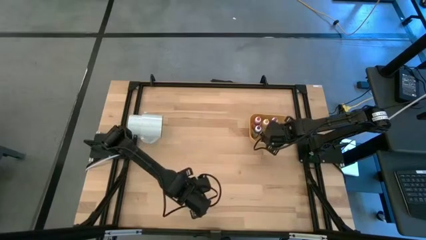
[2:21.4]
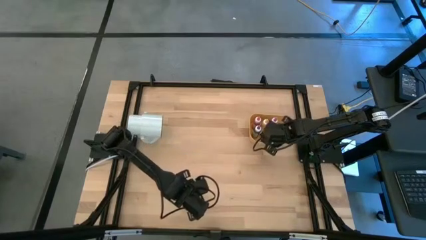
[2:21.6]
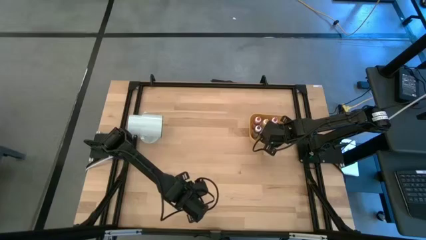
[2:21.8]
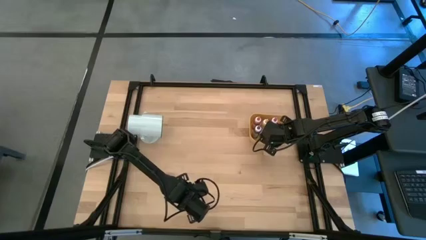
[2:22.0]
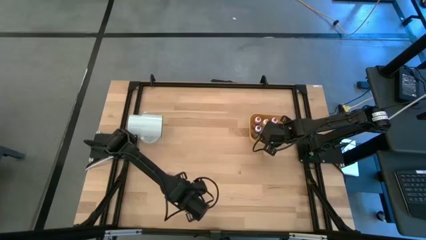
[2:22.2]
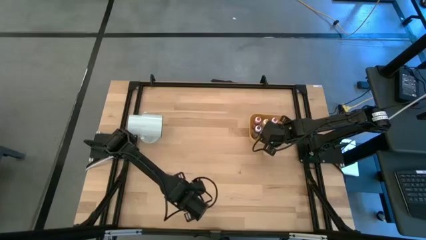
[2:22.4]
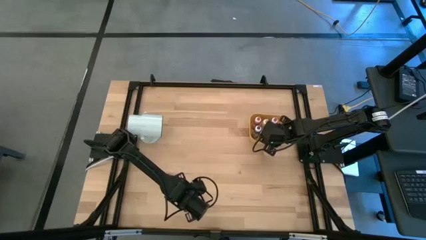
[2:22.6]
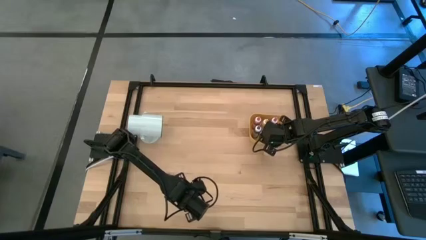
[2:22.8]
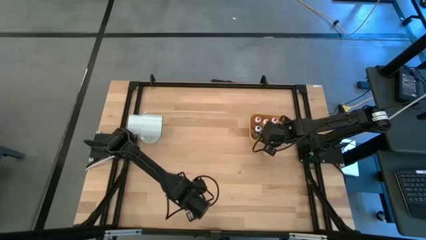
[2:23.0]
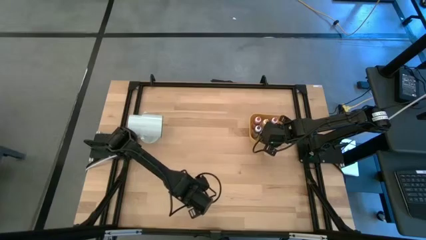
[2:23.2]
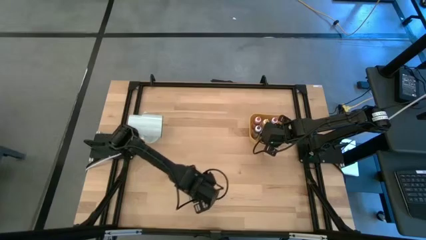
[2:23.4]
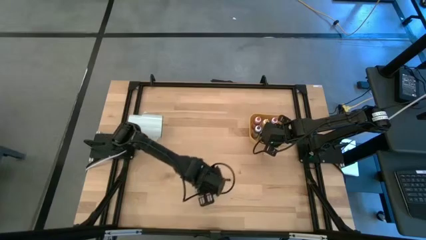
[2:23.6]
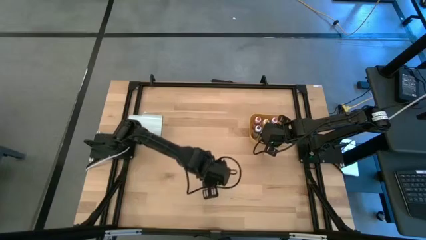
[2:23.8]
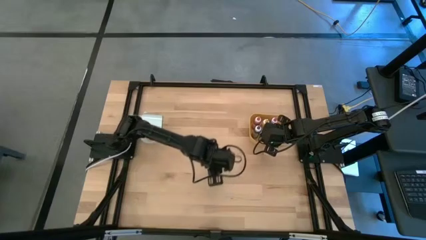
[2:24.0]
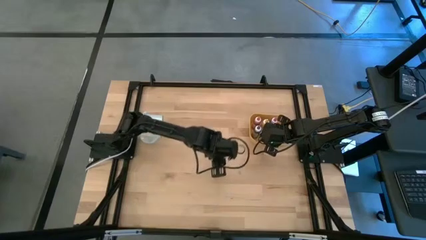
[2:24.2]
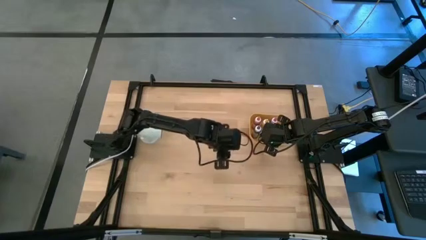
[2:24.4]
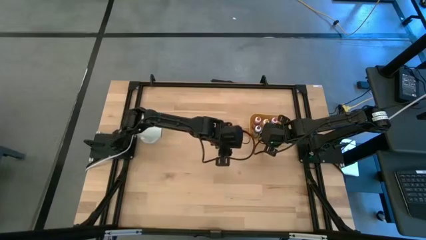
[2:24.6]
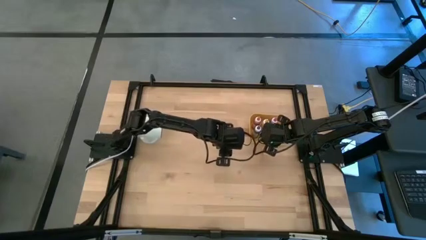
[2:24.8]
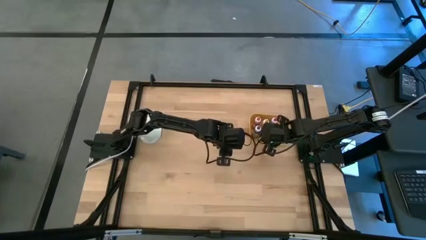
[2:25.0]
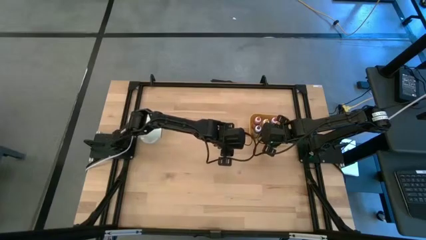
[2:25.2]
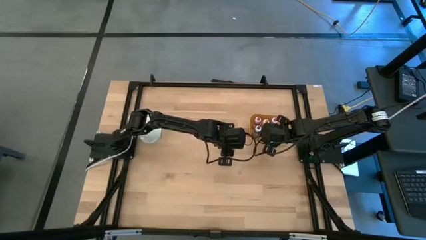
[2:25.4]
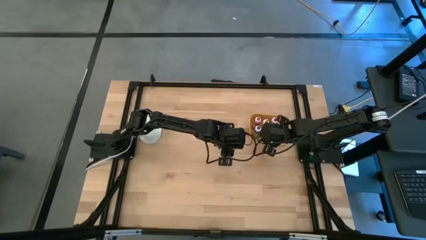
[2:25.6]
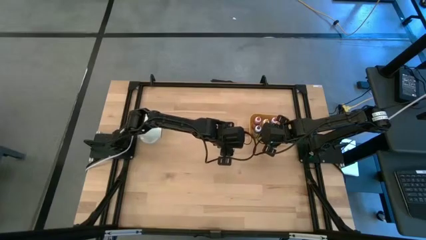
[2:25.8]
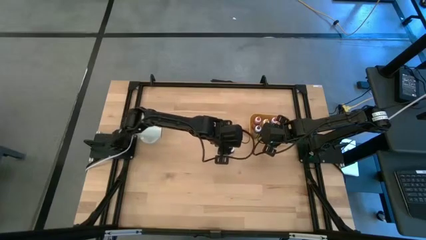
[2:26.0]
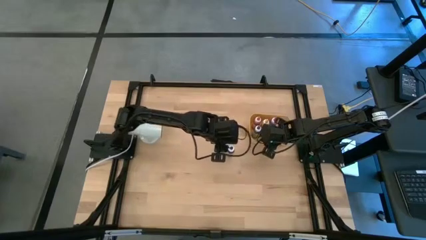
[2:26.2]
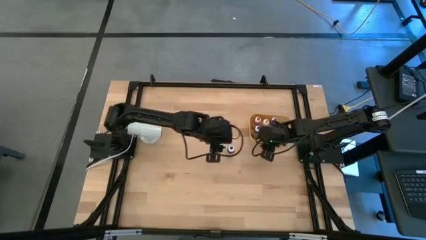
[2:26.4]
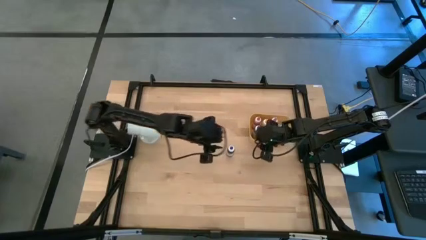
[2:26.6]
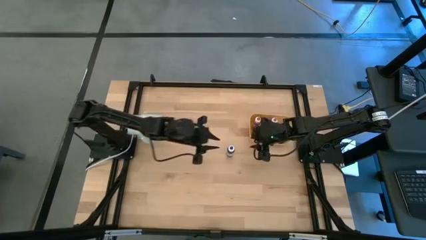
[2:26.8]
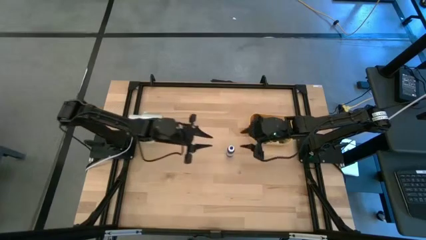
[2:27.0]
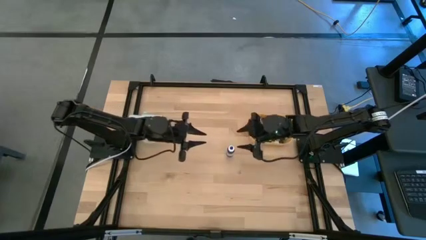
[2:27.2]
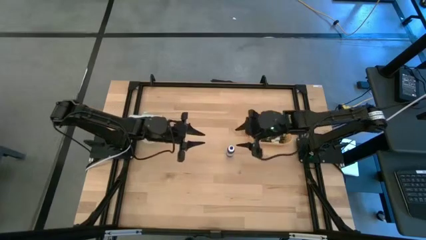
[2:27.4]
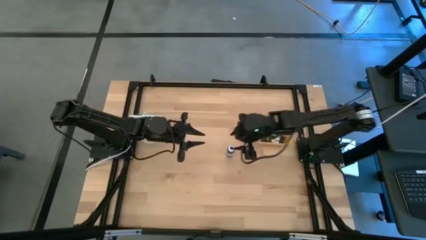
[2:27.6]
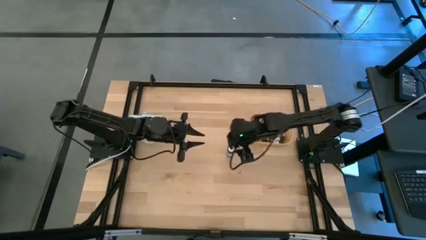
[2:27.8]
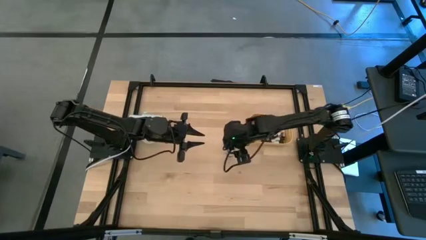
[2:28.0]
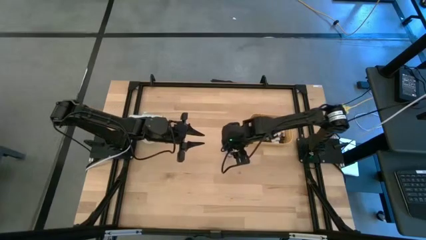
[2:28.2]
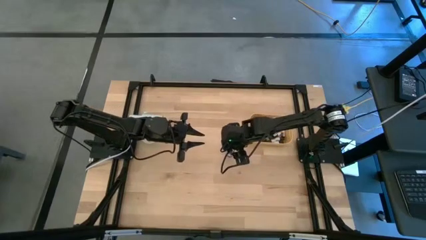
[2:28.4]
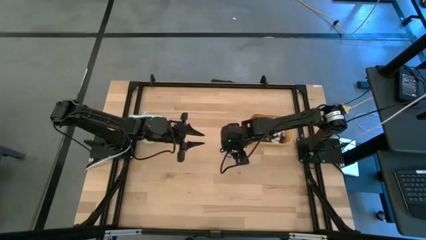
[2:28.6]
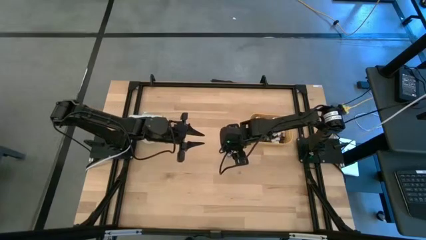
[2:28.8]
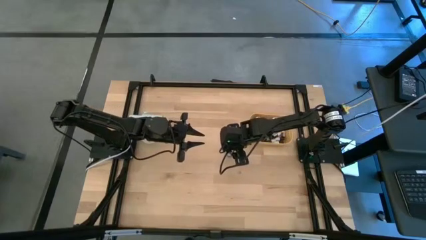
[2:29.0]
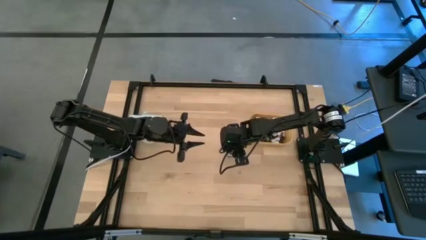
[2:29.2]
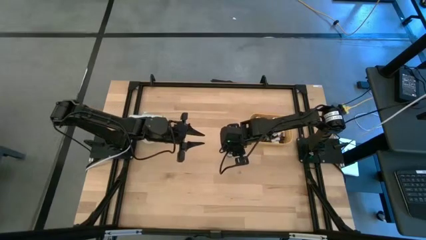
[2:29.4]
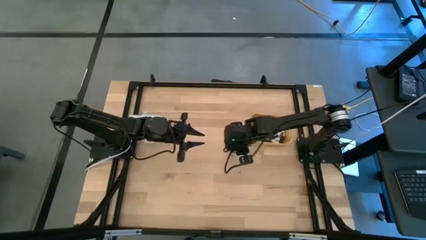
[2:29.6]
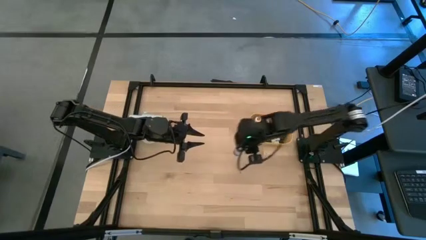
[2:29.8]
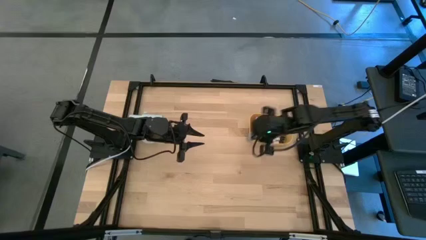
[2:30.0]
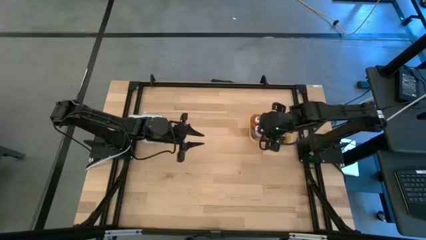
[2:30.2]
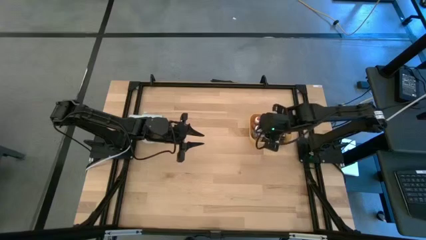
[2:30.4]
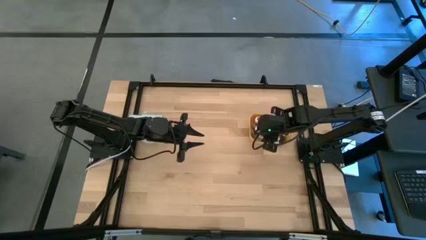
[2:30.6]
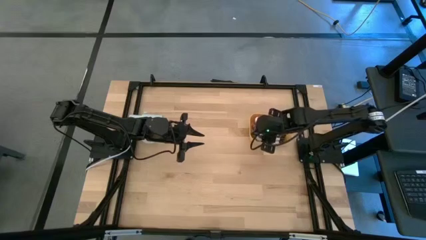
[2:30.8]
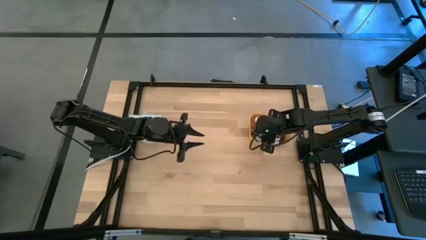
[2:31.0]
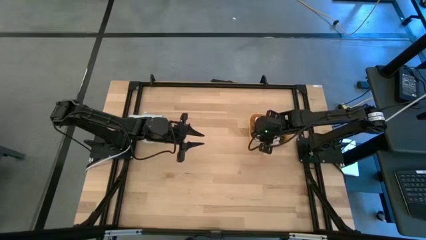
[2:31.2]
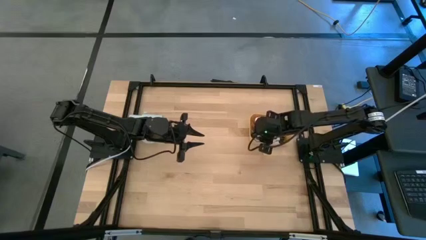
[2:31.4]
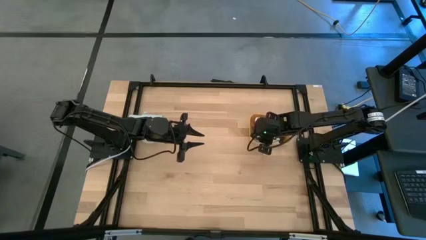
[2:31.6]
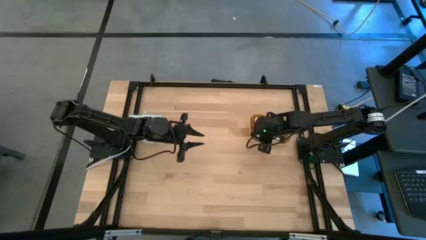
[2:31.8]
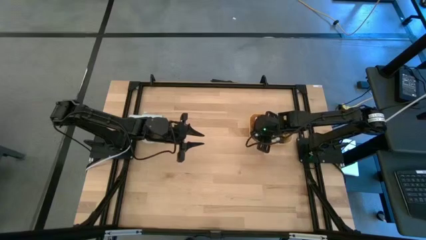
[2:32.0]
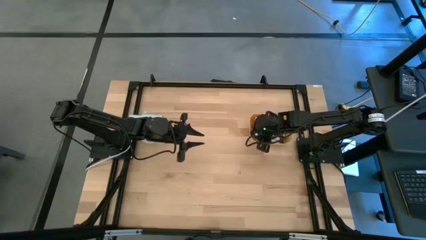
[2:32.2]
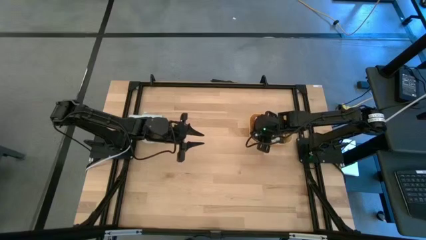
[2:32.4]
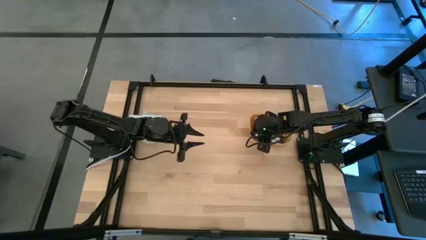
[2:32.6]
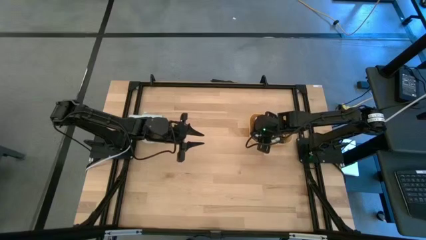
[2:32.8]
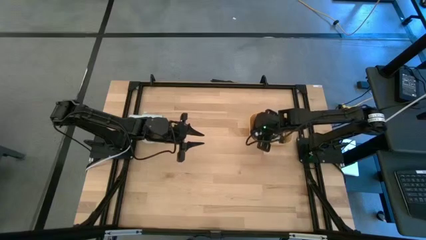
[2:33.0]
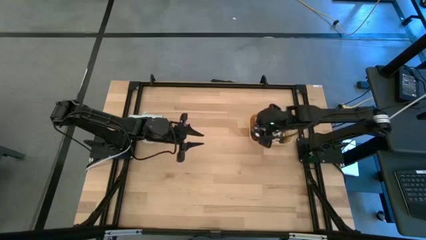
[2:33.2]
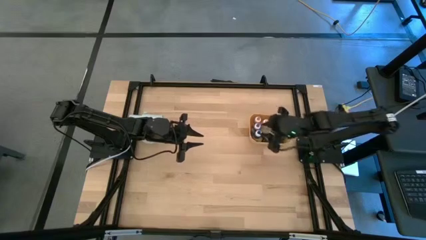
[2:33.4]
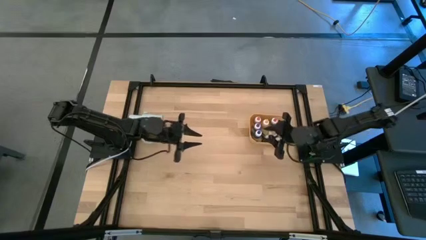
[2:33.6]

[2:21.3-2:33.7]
Task: Pick & Place food coloring
Put the blue food coloring into the yellow bin

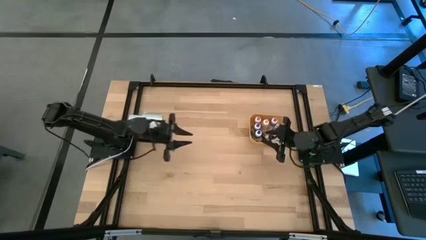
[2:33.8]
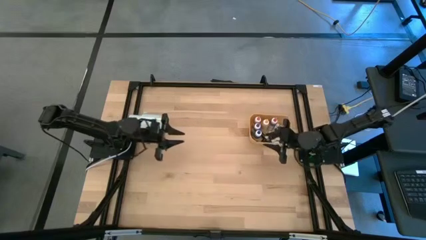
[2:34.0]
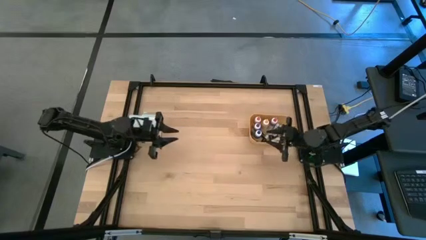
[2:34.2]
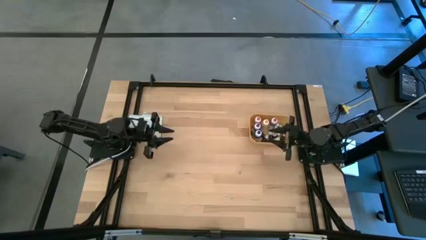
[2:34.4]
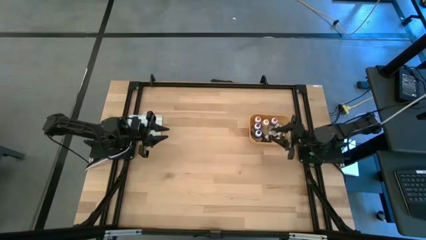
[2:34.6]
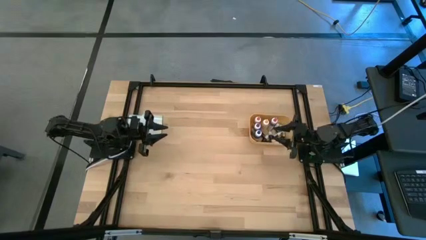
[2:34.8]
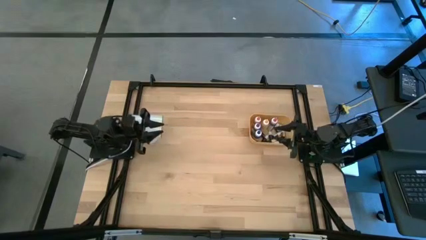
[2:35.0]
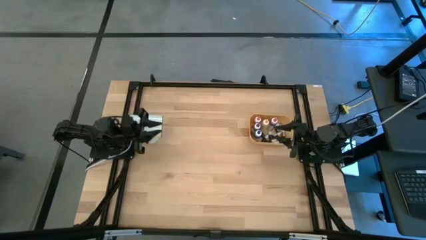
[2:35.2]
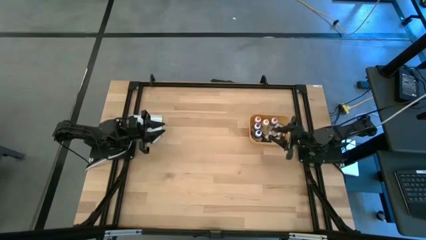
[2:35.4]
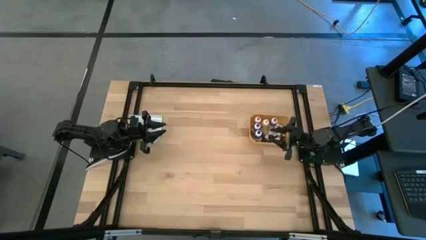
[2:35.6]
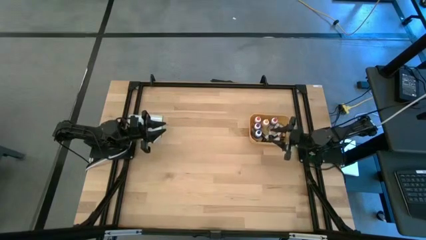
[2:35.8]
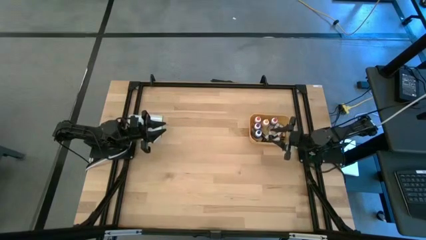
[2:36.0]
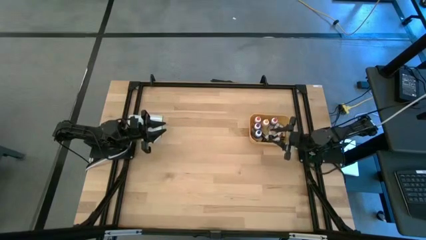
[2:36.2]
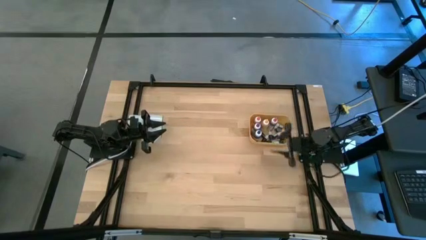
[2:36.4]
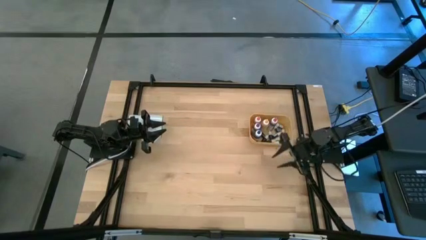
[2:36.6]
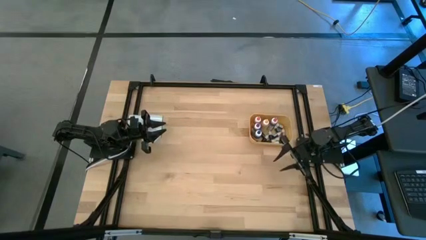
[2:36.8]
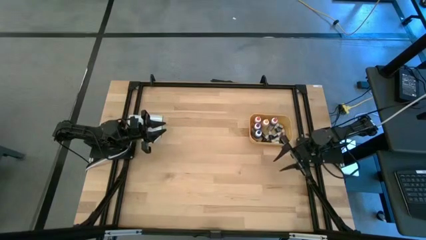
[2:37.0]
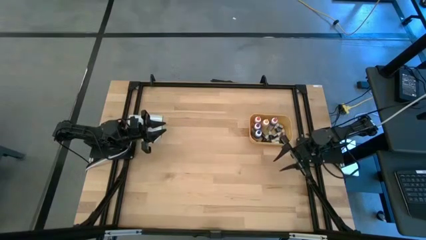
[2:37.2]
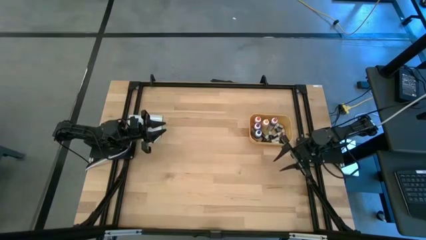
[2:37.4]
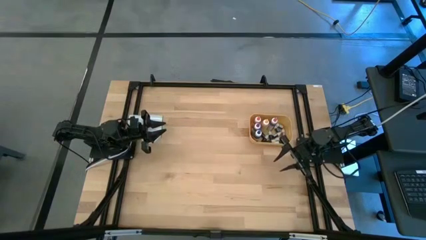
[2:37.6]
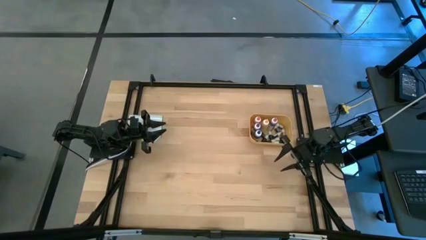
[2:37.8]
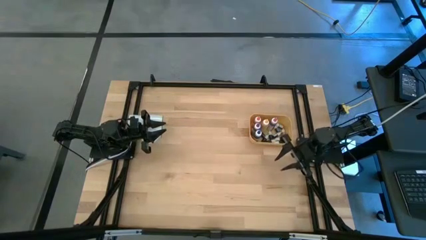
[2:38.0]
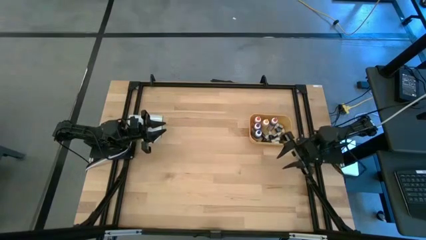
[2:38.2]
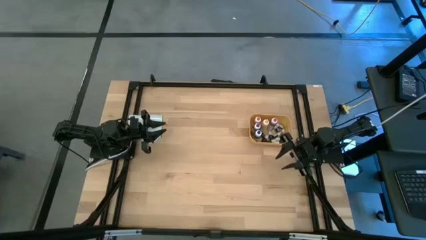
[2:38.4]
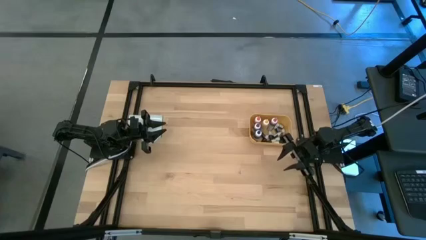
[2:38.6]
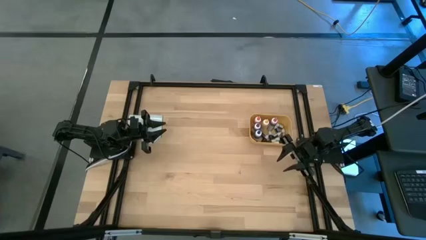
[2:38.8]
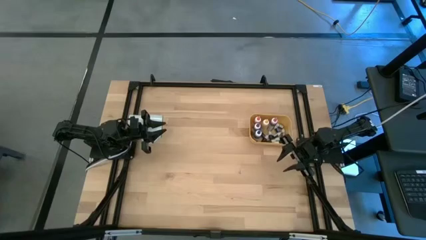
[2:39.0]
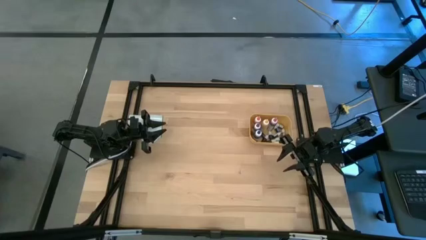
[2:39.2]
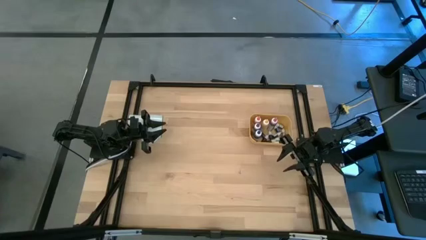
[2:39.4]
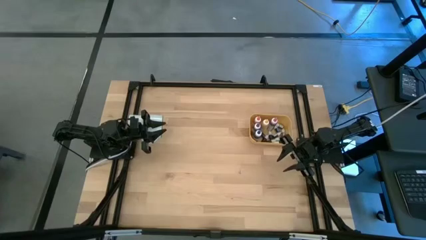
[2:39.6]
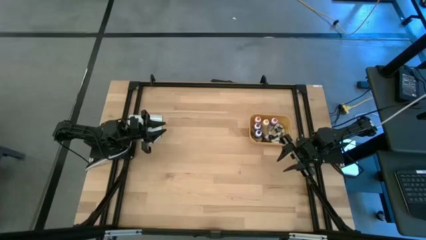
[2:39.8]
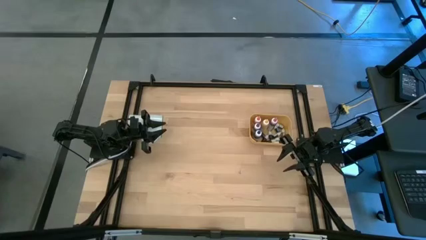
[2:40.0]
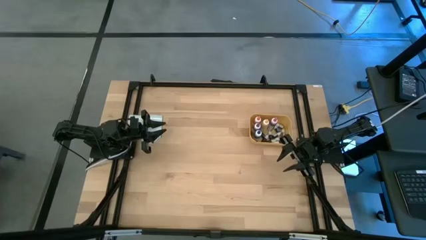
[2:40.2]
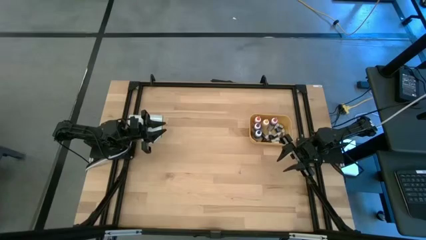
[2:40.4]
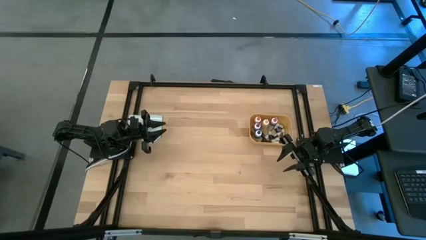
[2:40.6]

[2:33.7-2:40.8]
Return to Home Position
